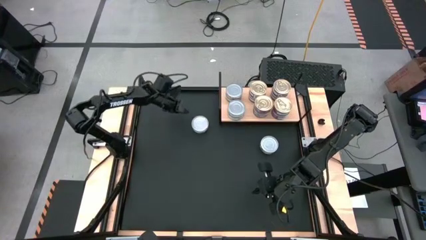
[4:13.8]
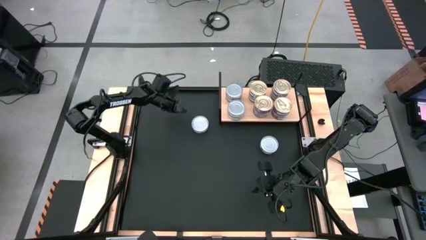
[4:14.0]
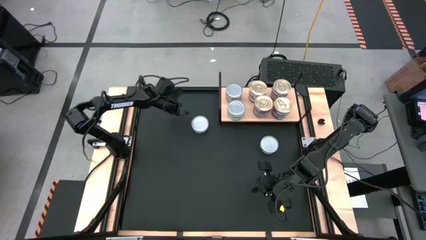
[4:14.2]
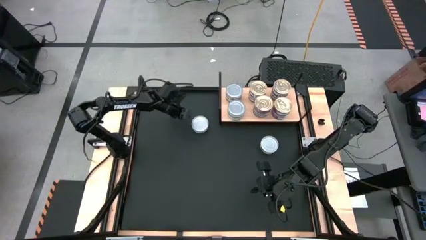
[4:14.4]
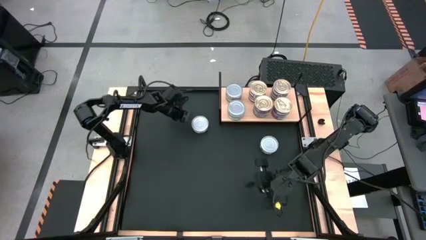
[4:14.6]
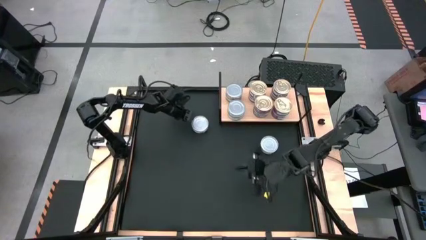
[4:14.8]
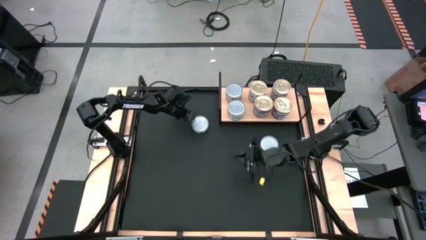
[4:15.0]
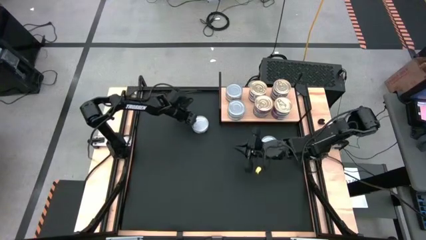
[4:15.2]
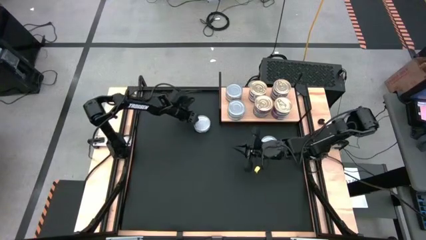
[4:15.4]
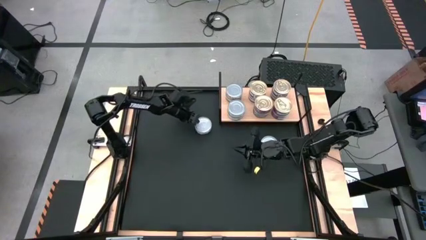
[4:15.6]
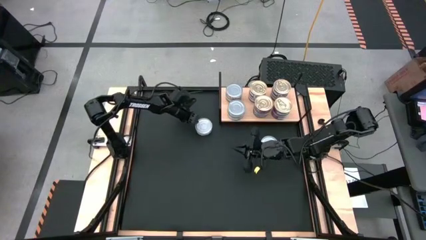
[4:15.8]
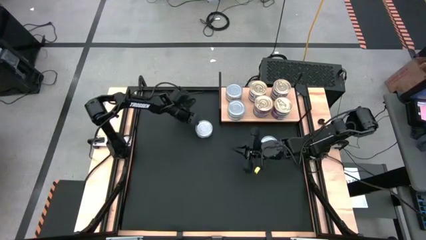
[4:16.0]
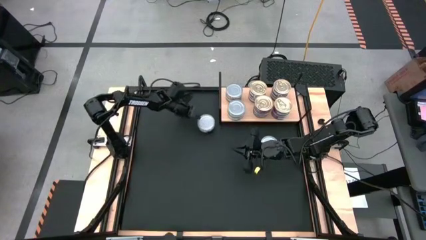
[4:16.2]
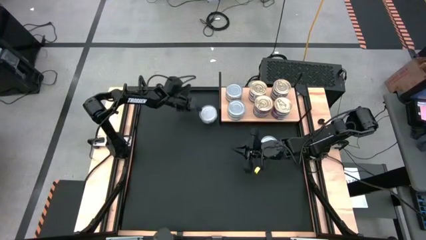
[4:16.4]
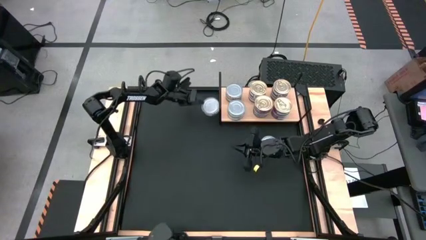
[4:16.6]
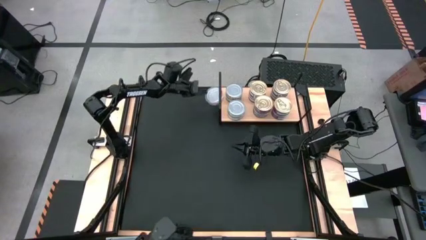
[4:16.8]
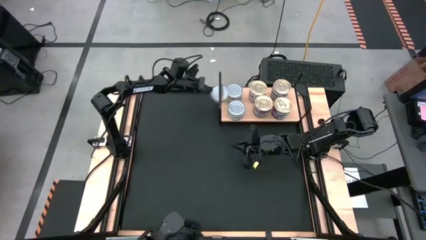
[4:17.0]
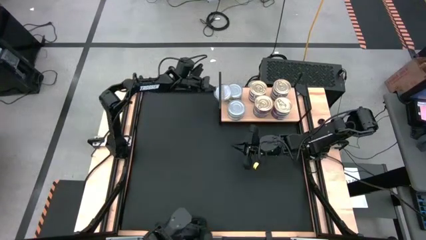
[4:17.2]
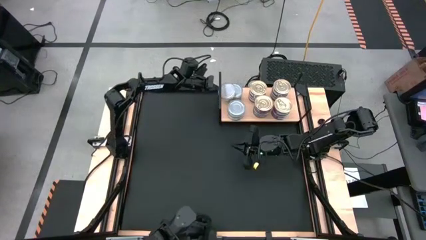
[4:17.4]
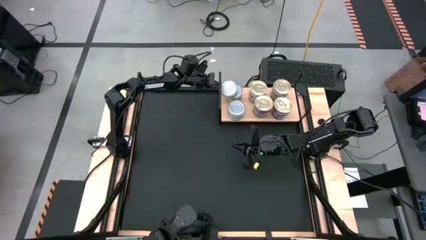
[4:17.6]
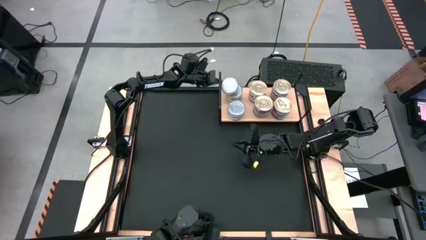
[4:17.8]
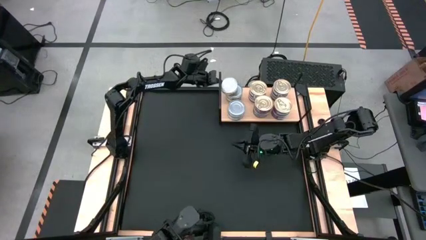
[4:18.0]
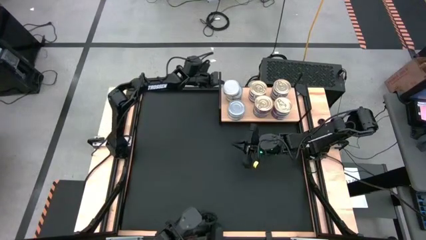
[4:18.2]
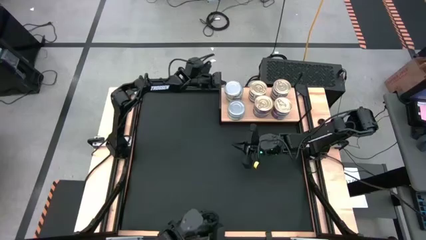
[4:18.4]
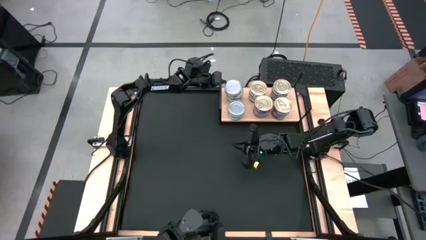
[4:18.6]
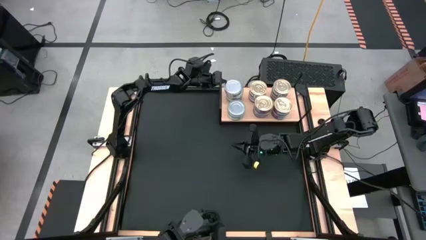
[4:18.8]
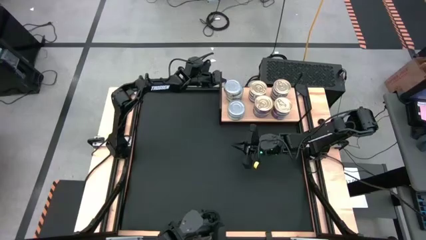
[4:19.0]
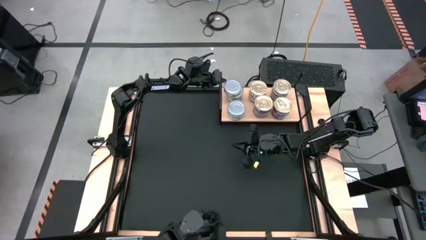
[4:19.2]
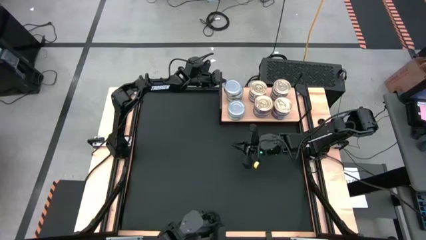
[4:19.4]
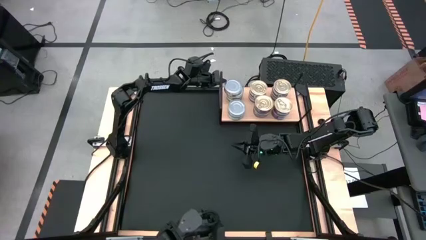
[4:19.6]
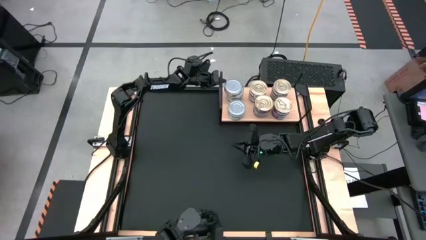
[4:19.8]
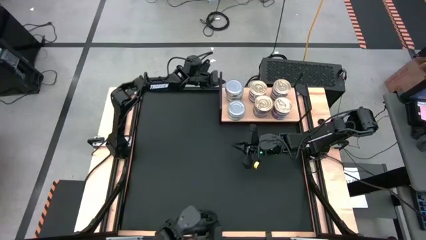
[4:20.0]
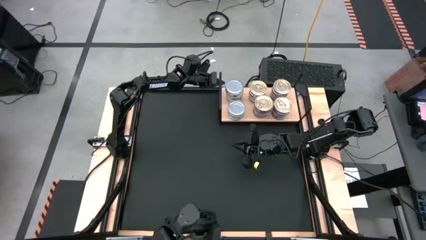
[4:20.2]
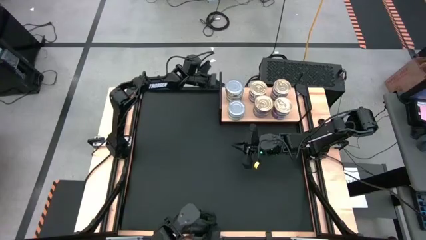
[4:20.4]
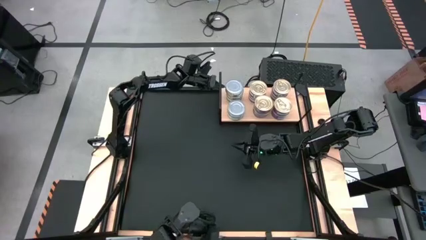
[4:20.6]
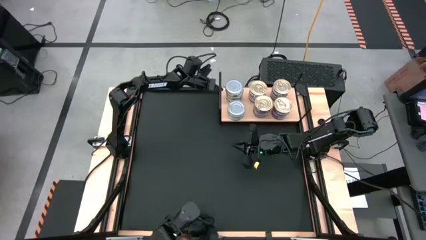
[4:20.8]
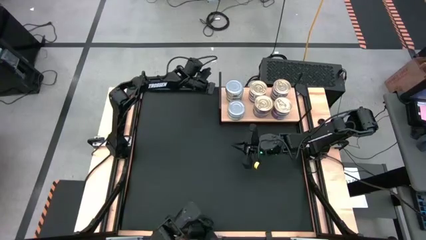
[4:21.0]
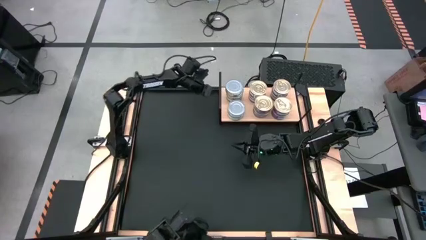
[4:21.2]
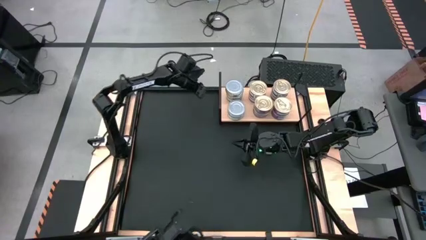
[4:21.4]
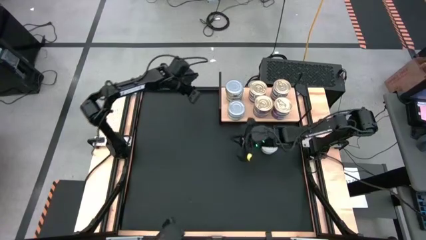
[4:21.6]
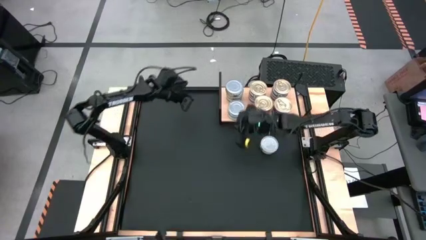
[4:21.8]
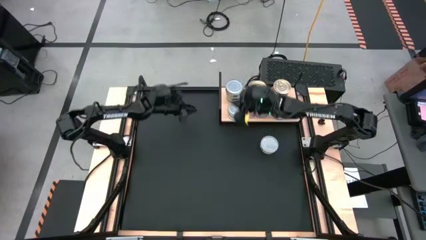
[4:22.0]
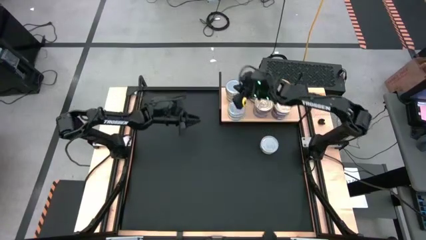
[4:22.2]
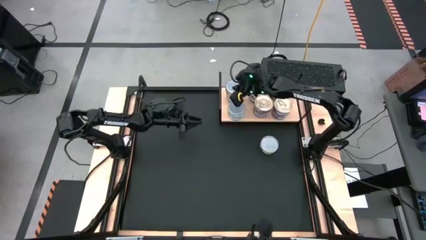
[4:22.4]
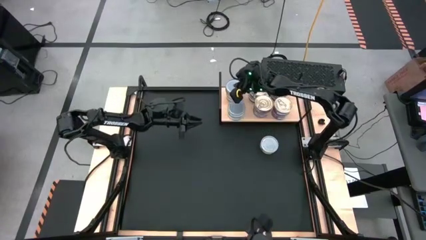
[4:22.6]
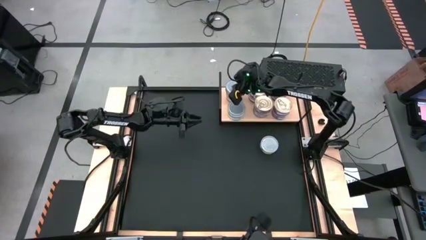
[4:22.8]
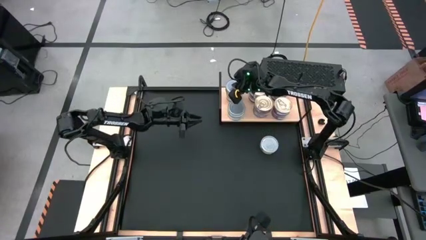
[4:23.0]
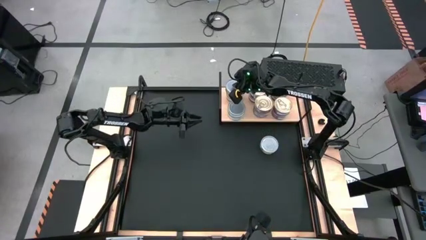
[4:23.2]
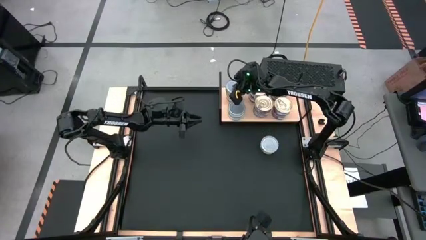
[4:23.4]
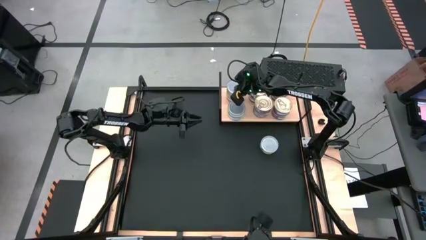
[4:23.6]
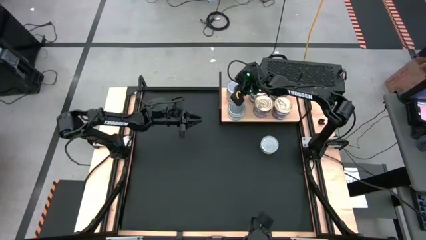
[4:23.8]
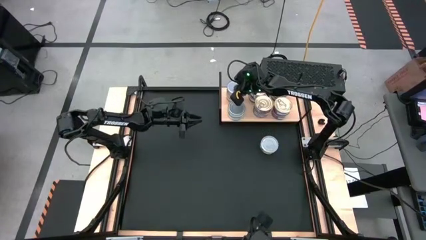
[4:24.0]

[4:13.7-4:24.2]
Task: Stack canned seafood by type on shelf
Stack the green tuna can on top of the other green tuna can on the shelf

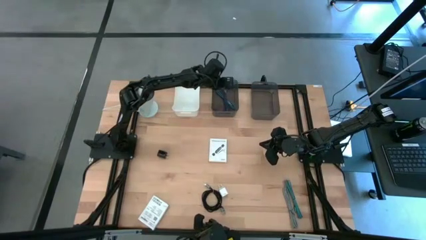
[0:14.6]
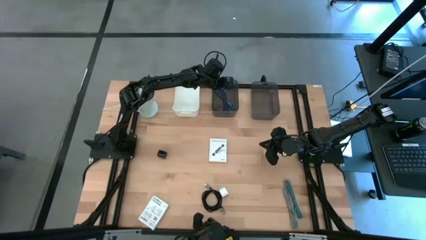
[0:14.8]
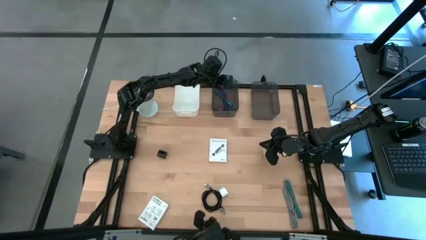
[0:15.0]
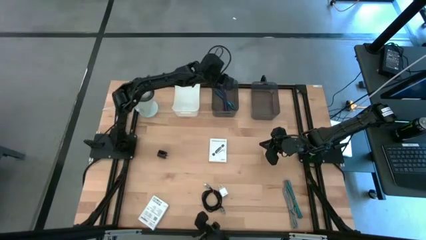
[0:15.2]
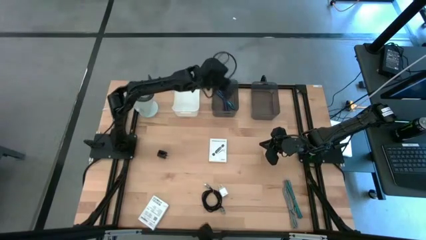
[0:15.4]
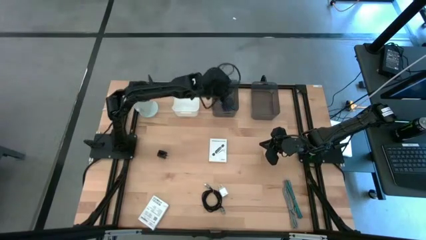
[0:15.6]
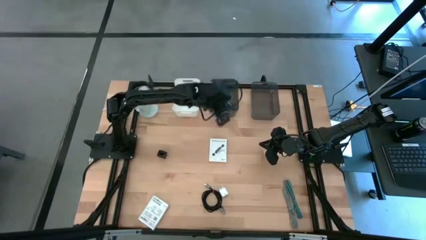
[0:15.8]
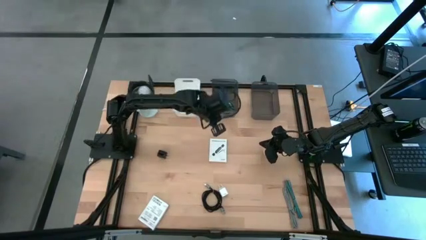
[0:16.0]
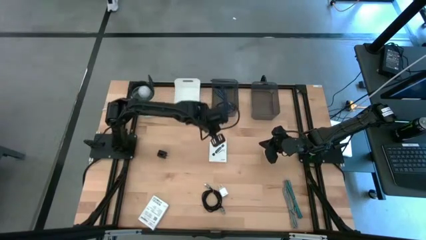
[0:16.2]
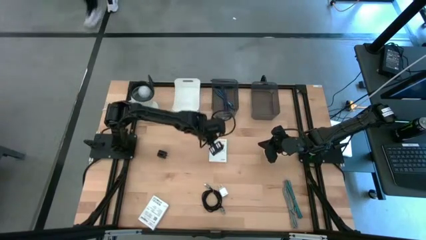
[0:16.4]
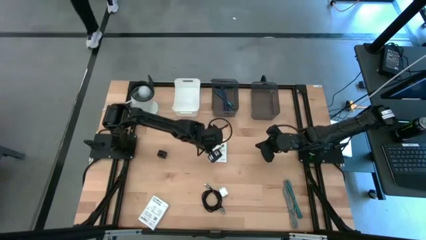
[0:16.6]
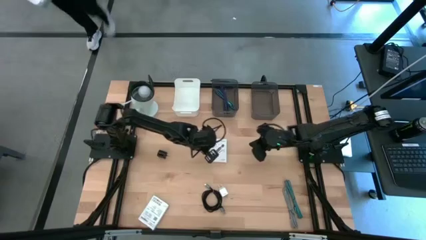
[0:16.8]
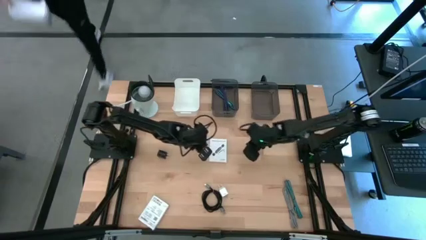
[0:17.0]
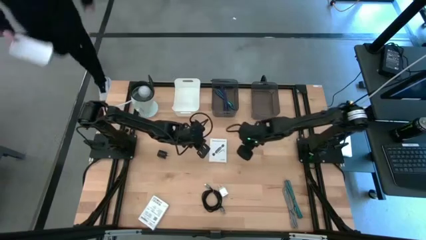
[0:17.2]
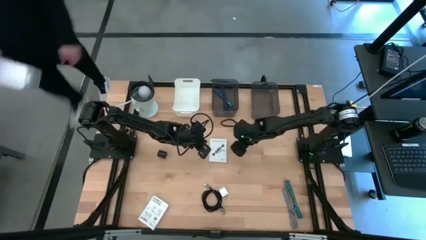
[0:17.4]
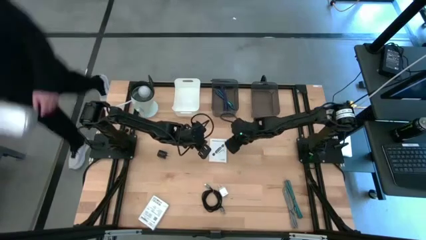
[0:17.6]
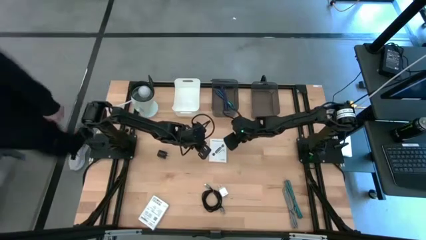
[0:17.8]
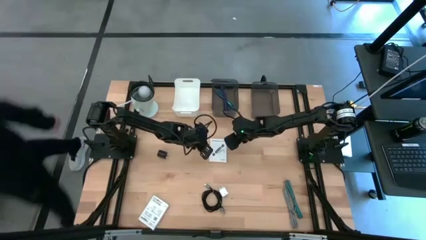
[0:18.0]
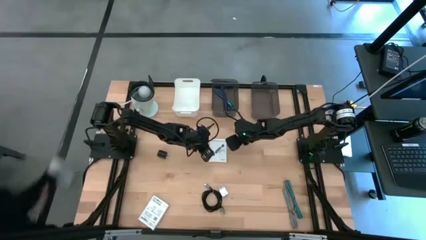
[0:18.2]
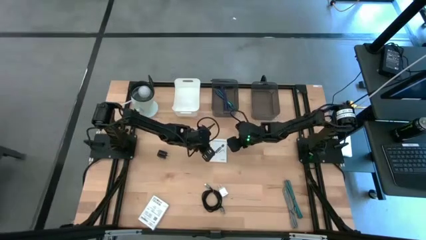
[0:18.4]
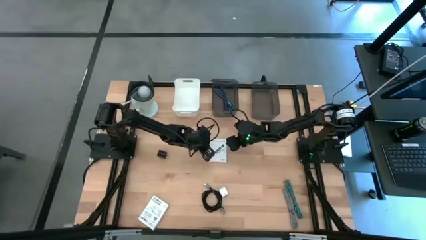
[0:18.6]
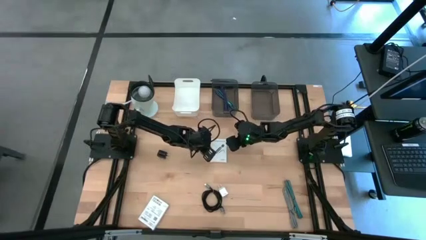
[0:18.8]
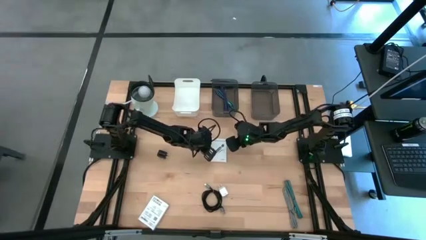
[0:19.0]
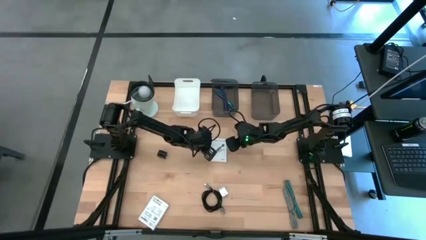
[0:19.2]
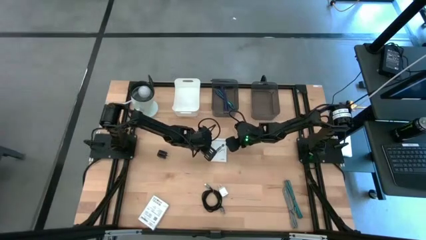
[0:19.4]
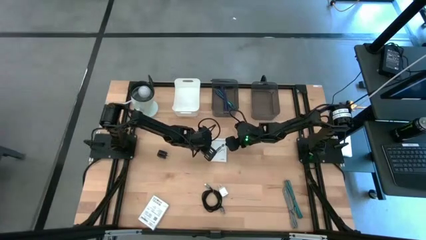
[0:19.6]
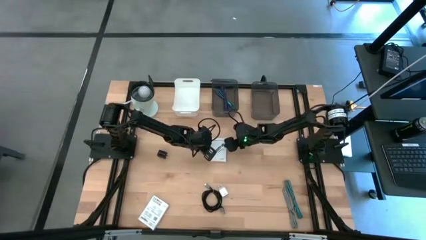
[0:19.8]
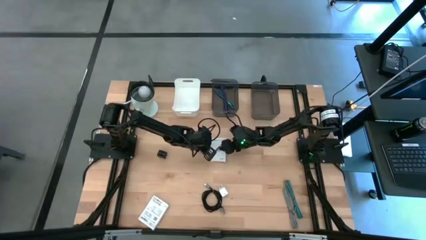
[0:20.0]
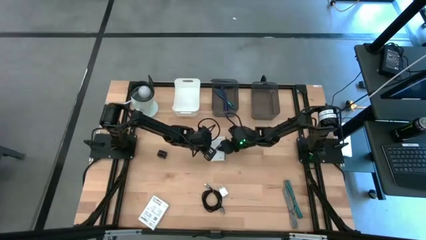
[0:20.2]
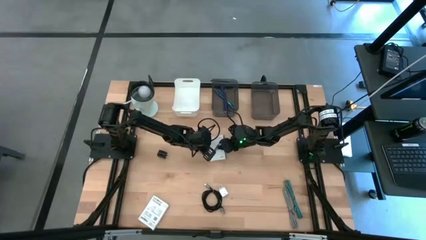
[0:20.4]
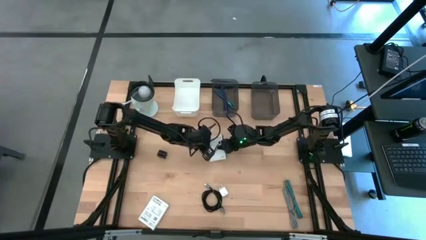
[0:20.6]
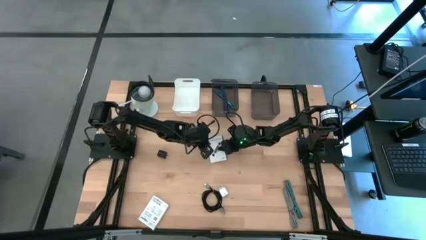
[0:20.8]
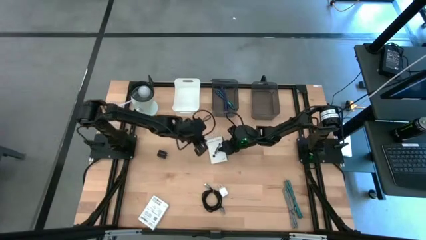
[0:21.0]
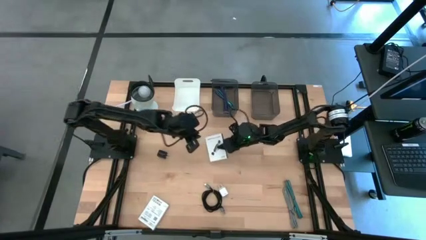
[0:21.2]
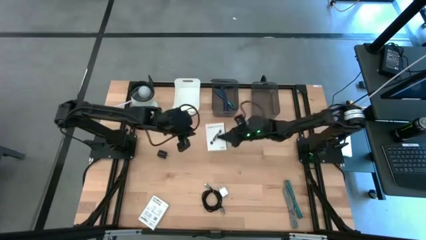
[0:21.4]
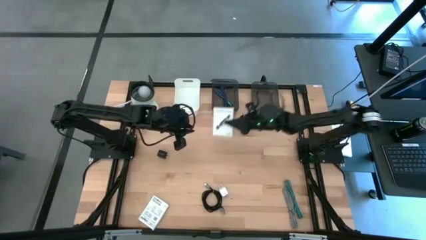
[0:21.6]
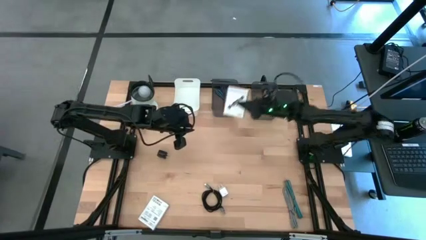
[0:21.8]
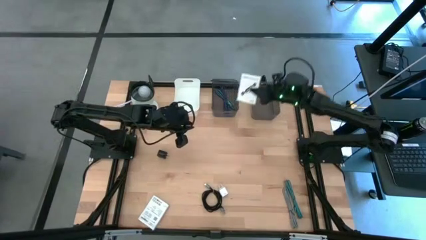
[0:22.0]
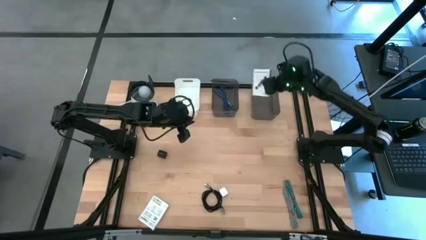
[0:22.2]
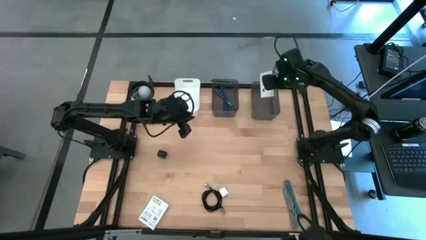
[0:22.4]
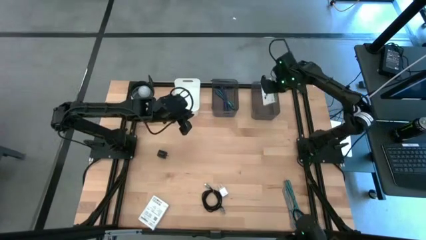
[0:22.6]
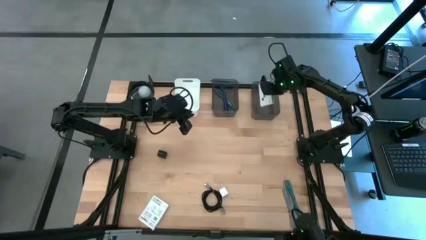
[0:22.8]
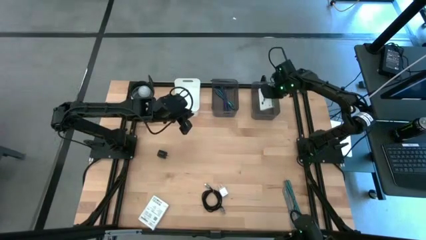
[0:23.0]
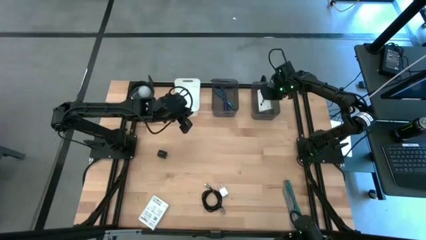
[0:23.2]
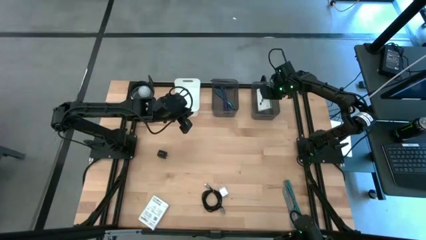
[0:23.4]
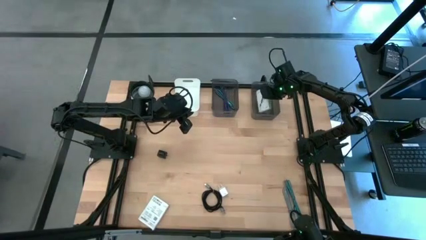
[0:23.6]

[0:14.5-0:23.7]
Task: Pick and place items into bin
Put the top card reader box into the right black bin
